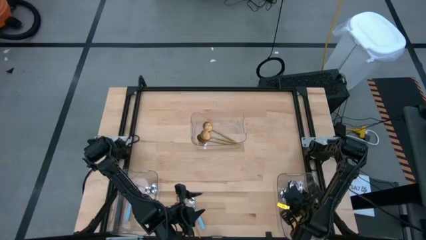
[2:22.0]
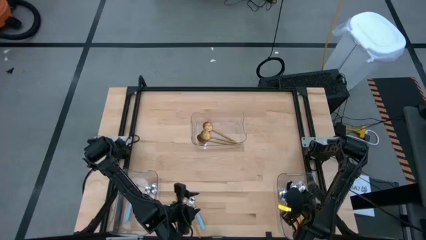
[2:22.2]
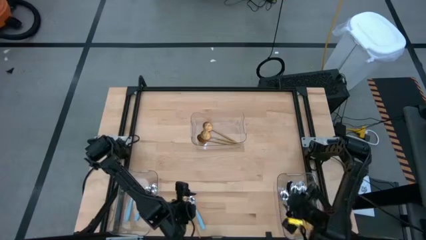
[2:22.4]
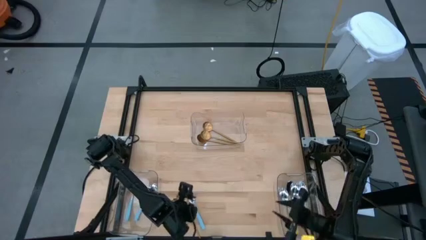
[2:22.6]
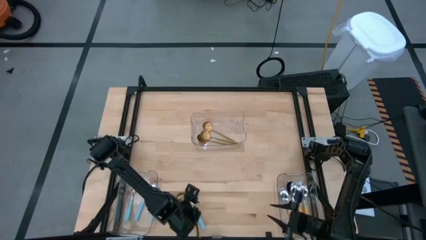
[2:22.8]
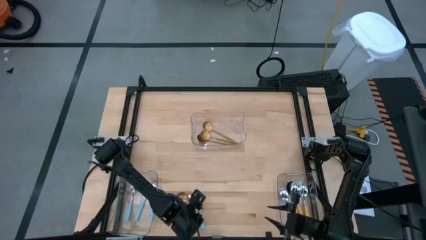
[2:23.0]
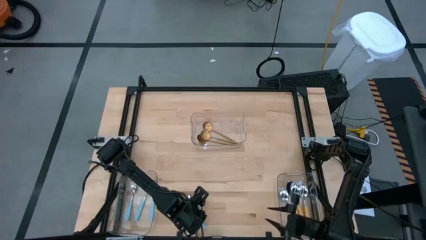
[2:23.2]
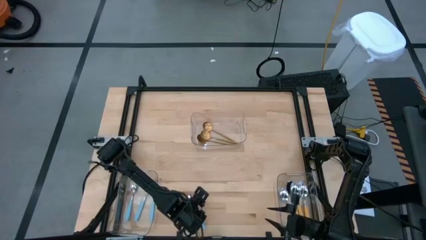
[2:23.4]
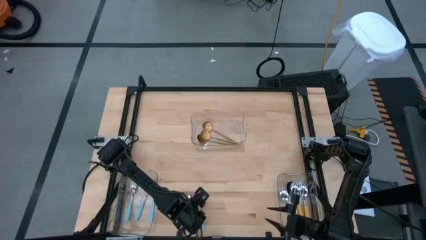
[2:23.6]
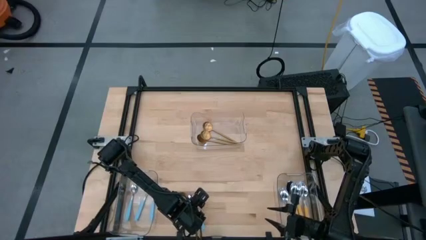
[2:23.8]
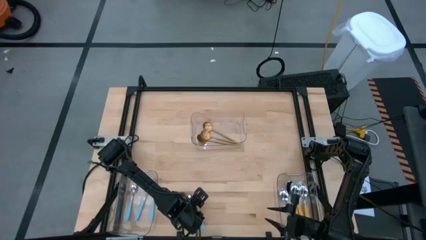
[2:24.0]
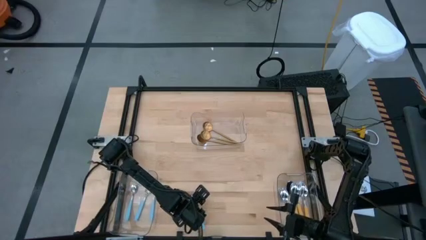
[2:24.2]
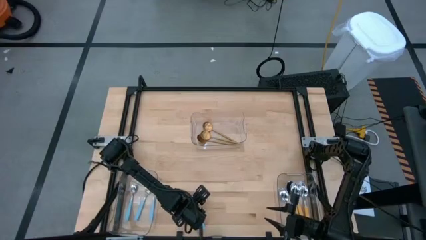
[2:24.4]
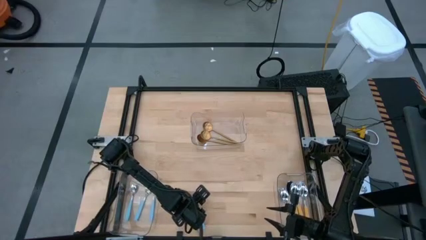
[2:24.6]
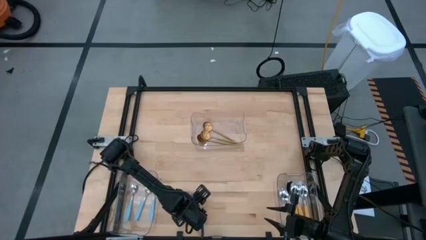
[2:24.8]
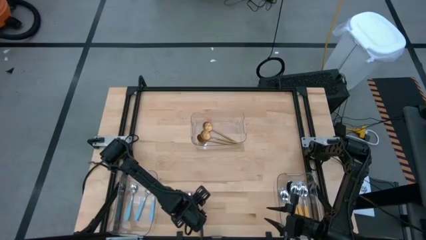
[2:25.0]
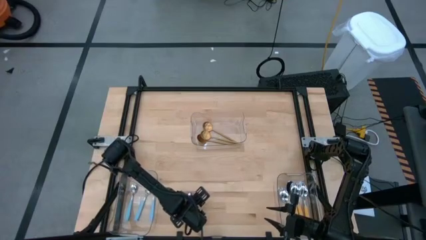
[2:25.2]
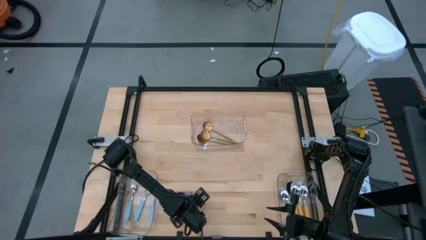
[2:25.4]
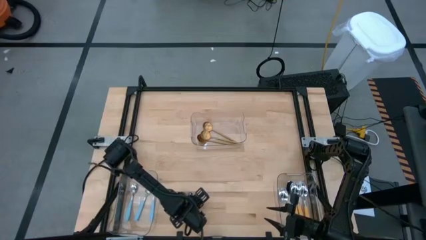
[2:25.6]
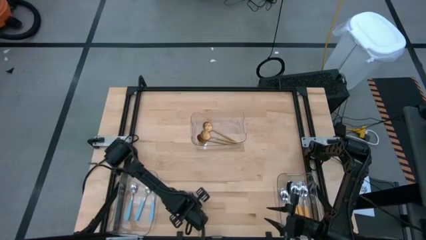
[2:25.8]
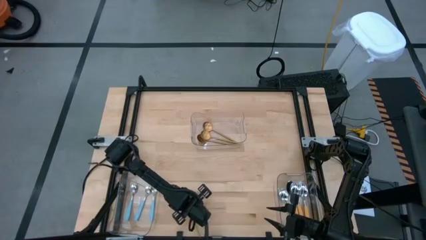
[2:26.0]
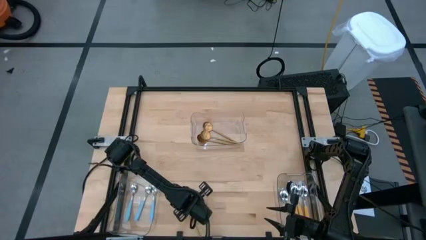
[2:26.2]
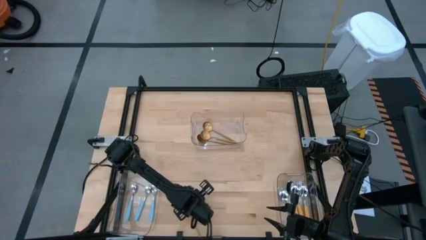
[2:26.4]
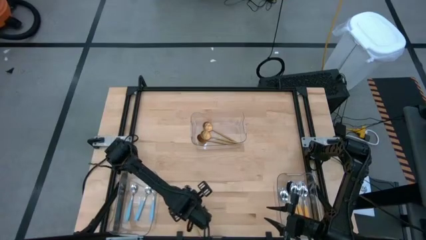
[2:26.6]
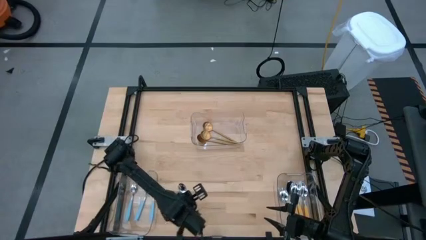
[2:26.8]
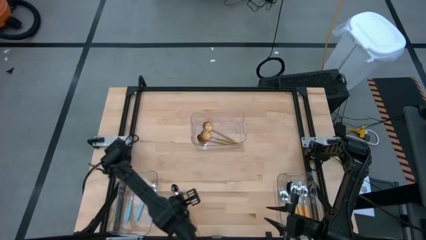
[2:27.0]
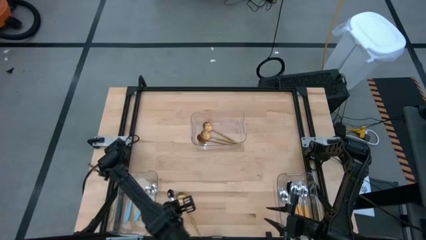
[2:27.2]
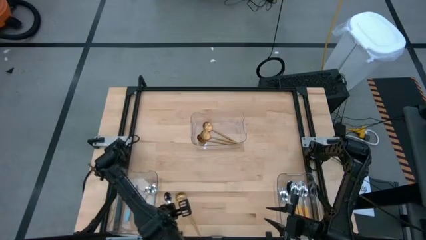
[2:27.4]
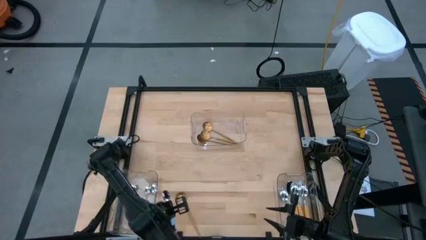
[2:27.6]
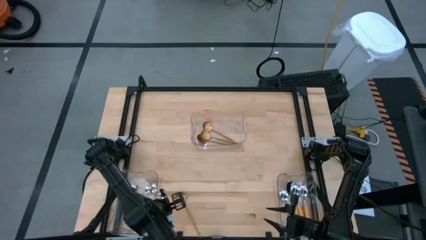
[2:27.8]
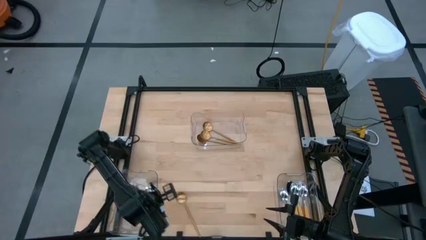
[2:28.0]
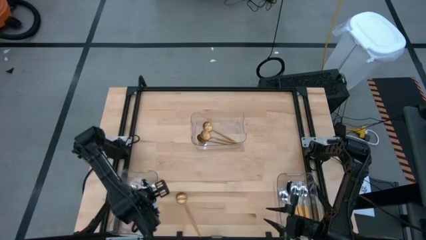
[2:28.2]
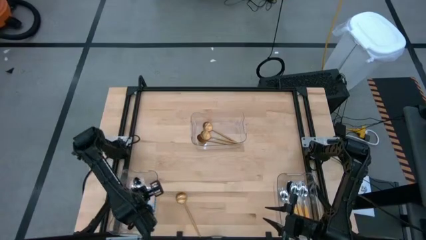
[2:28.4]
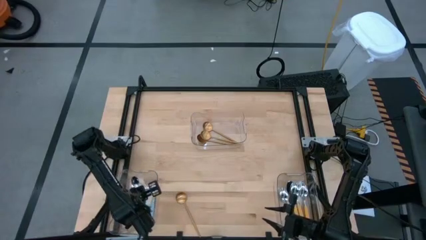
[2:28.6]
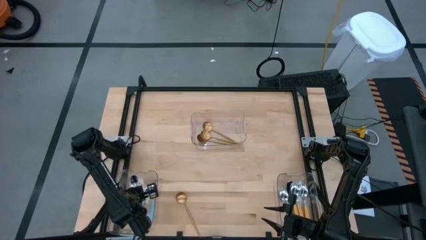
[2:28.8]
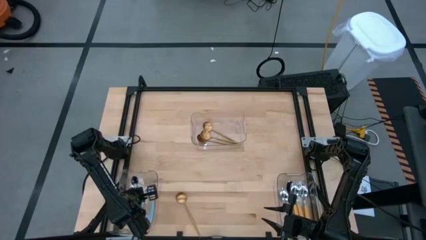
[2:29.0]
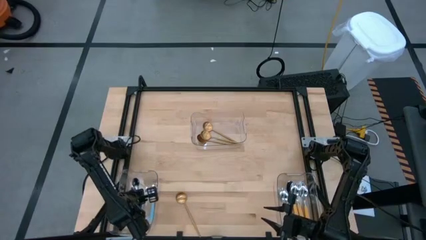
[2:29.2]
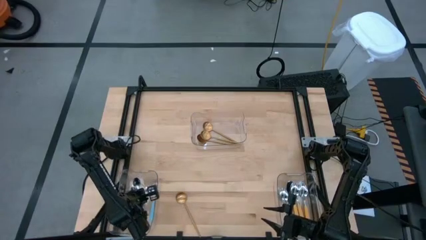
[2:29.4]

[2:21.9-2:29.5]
Task: Sort silverware by color (type)
Put the blue spoon into the top transparent bin

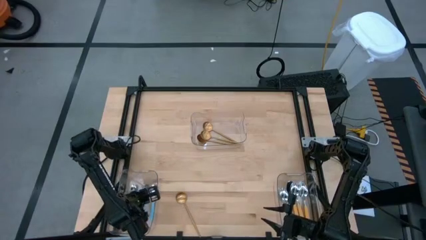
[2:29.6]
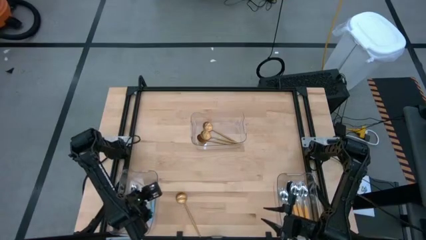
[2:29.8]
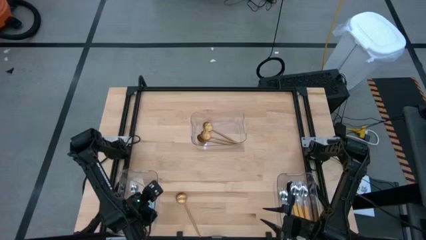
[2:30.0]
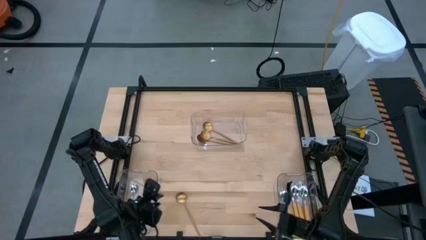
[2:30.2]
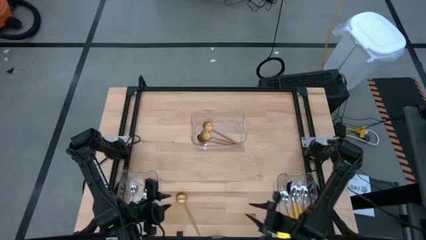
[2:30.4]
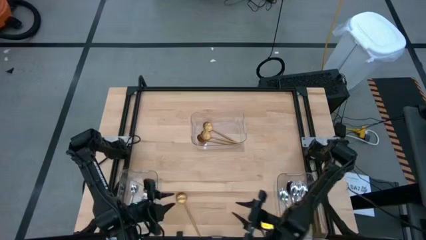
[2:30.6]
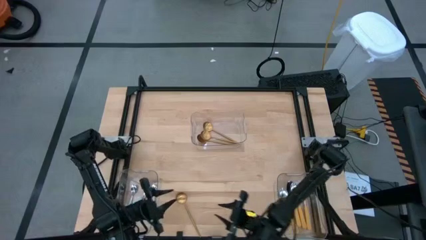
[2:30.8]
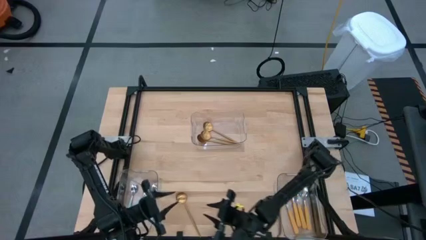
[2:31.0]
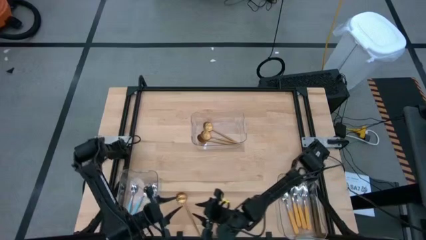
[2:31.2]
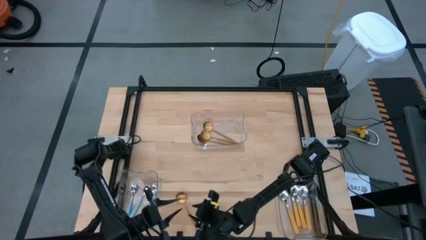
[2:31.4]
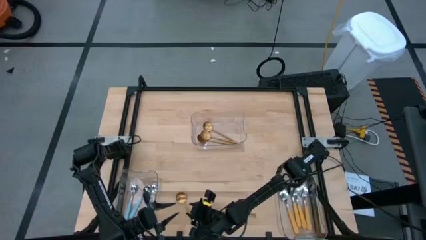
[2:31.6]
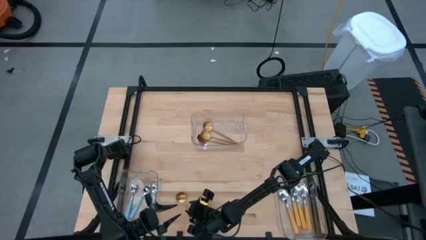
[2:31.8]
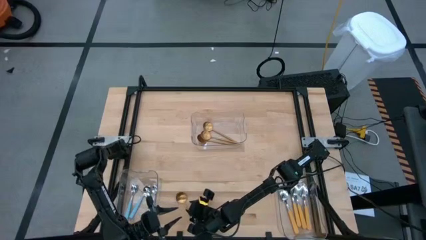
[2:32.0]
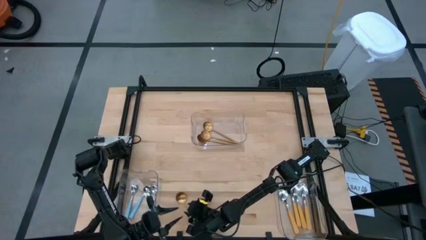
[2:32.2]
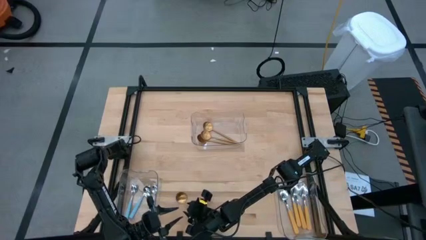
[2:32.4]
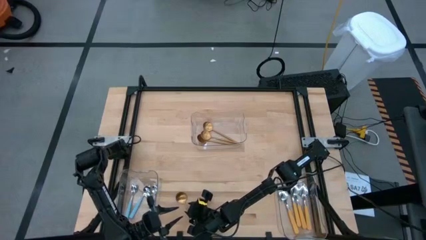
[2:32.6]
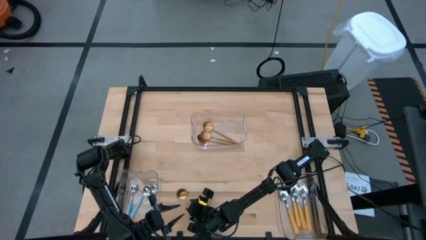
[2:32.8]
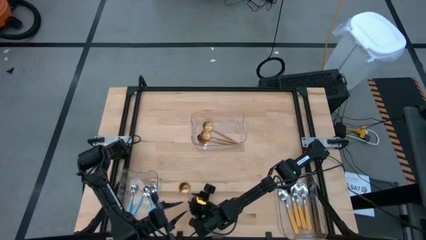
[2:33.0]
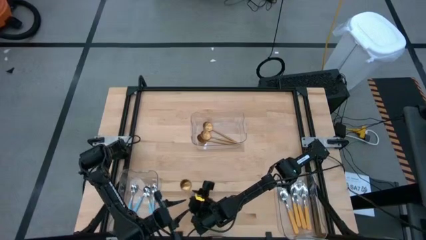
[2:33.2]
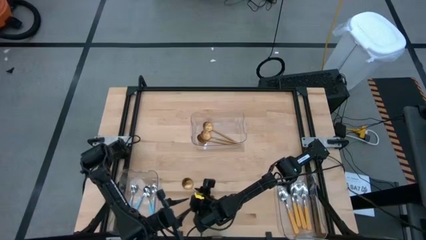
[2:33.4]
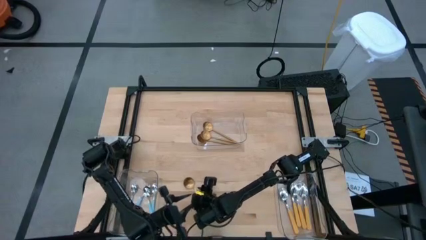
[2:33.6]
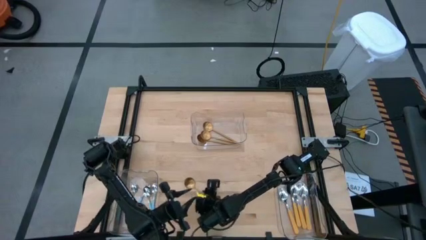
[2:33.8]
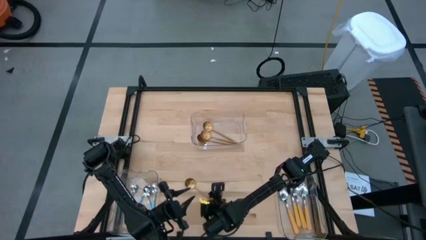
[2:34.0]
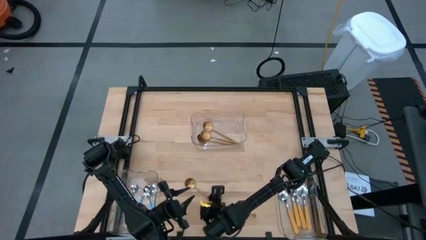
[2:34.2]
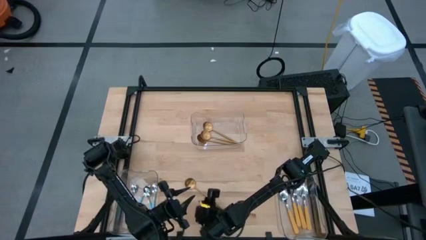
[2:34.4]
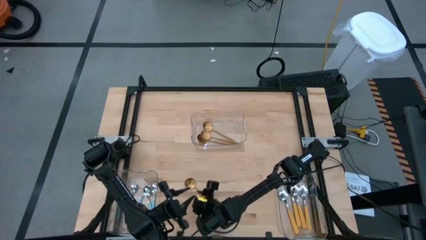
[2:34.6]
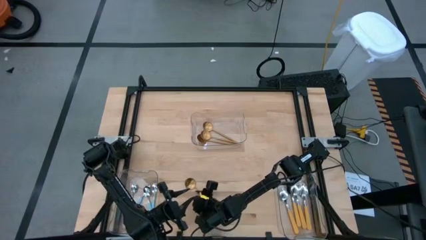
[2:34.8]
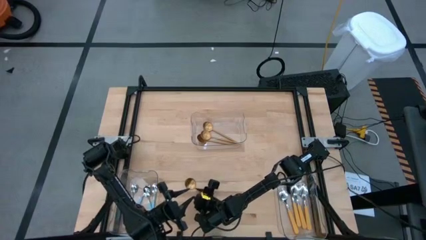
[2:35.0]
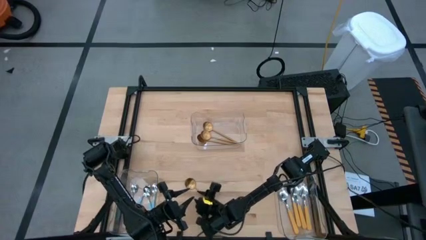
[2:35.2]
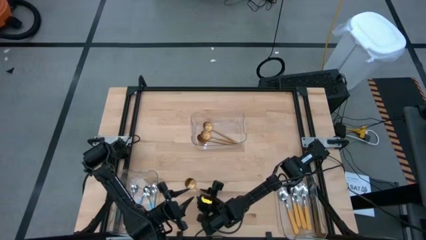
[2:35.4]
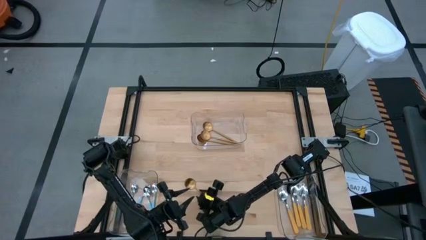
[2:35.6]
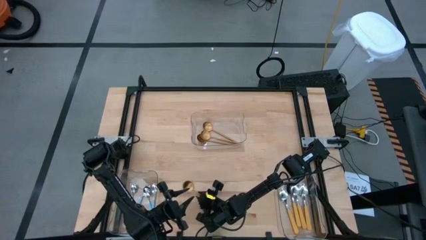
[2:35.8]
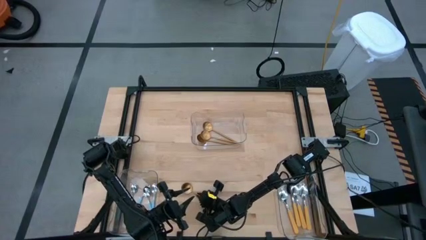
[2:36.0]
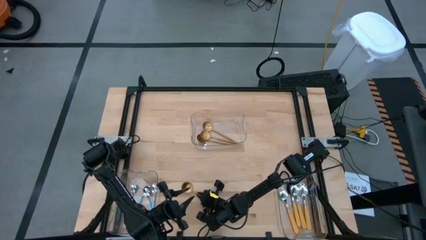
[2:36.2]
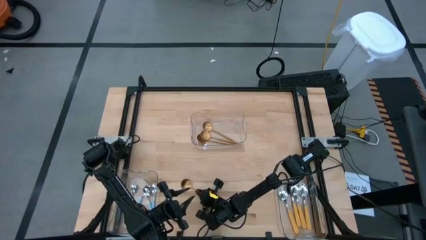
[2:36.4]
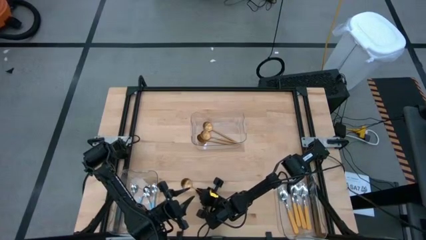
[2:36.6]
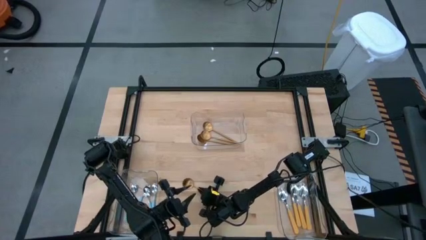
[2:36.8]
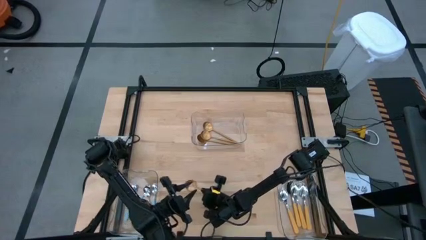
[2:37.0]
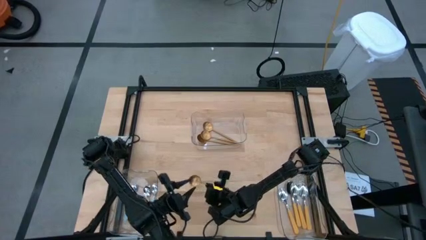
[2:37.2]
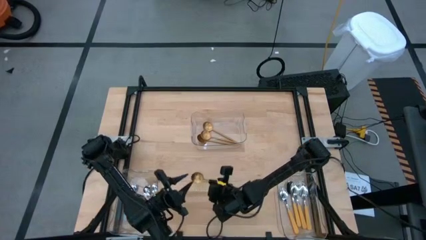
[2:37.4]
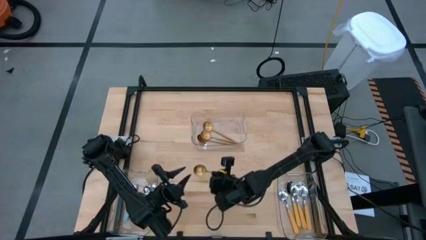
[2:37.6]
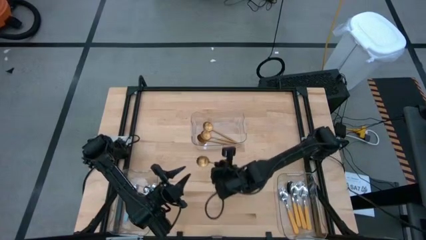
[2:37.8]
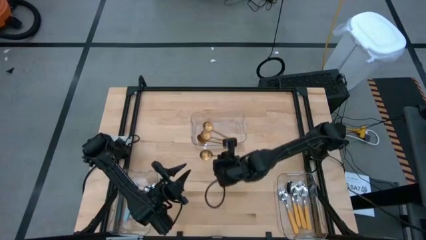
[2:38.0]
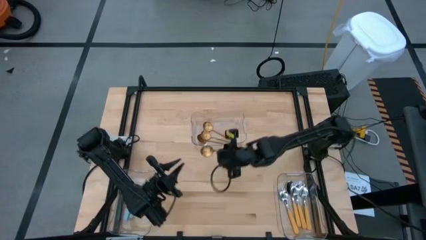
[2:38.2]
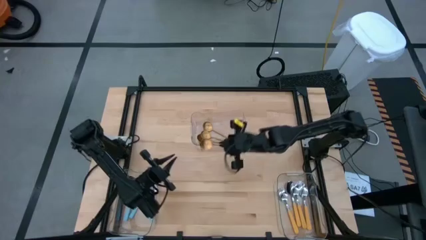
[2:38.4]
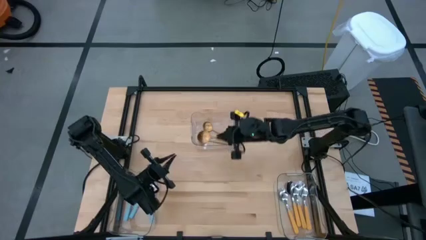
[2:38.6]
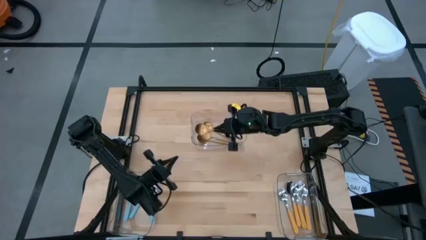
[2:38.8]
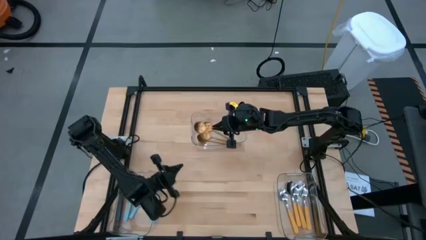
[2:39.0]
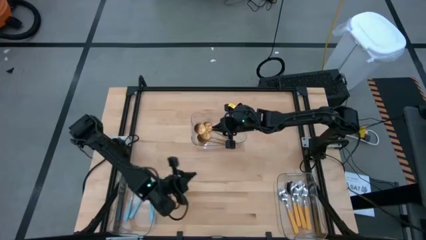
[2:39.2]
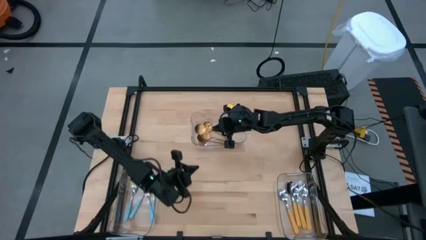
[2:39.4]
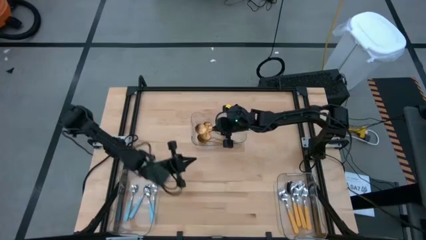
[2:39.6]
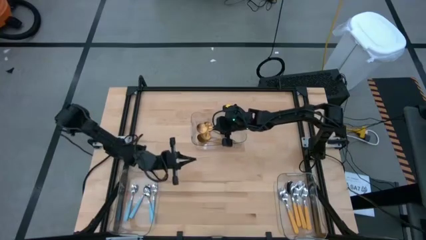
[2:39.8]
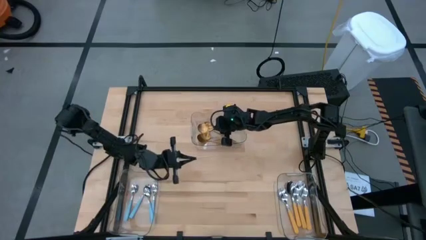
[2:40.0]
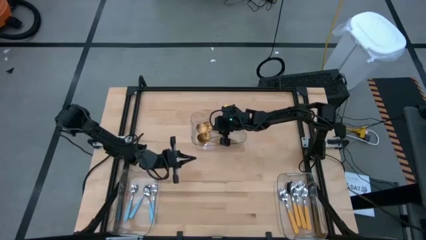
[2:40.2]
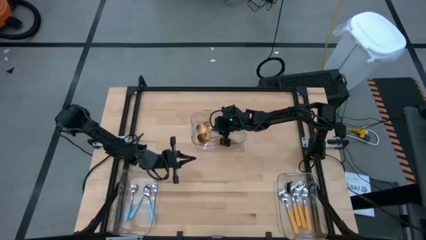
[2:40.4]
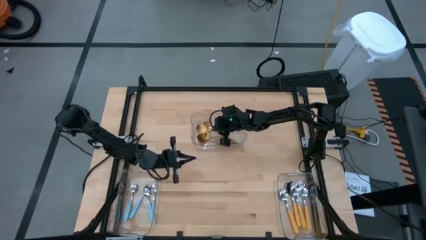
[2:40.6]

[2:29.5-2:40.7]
Put the gold spoon into the top transparent bin
